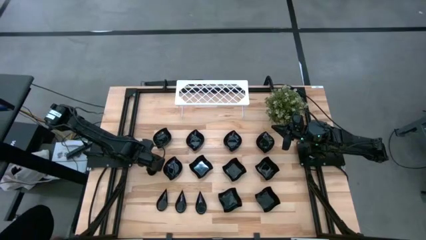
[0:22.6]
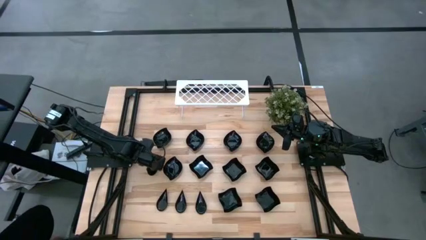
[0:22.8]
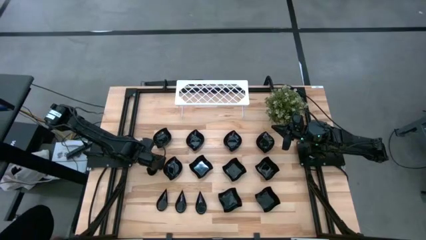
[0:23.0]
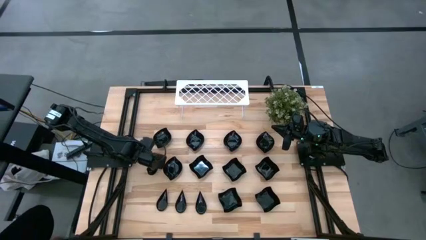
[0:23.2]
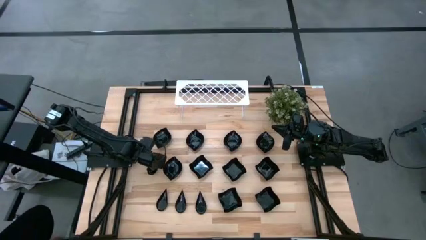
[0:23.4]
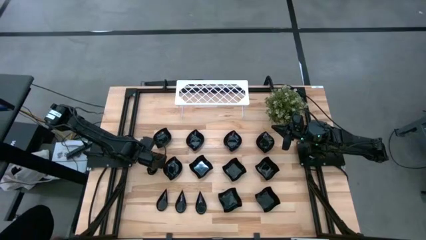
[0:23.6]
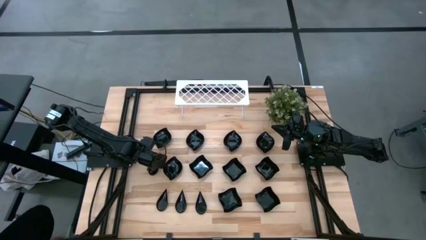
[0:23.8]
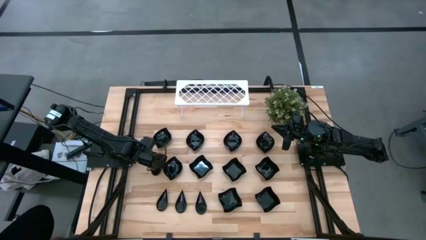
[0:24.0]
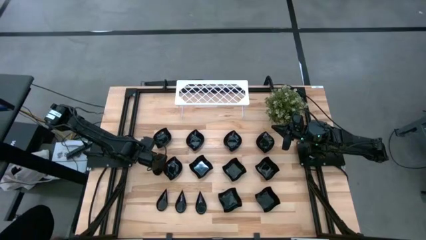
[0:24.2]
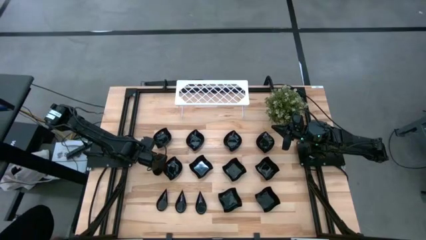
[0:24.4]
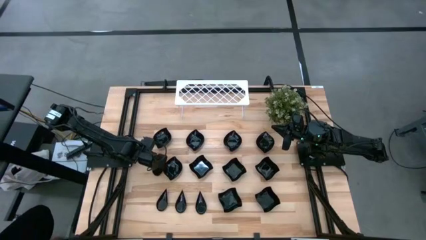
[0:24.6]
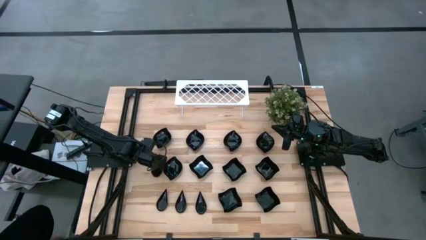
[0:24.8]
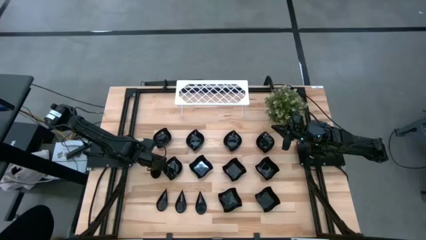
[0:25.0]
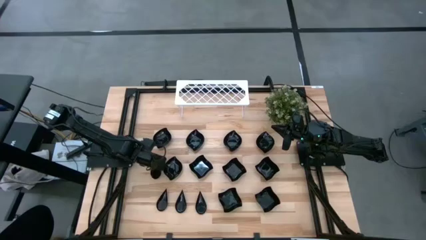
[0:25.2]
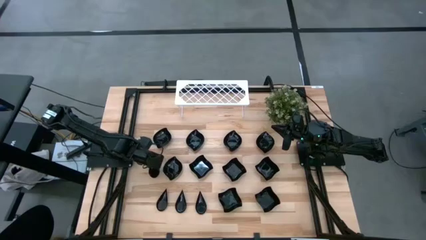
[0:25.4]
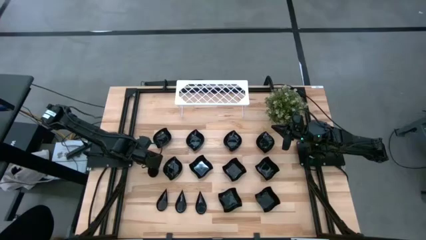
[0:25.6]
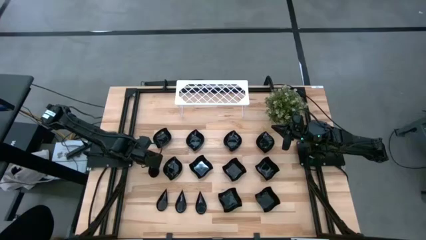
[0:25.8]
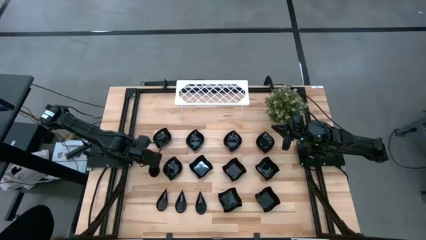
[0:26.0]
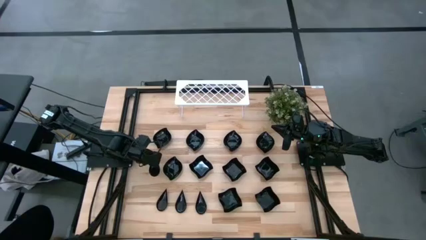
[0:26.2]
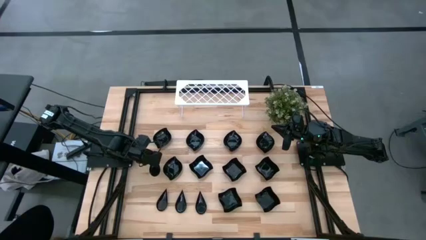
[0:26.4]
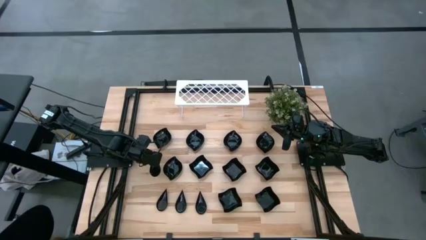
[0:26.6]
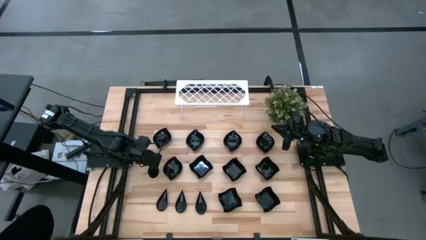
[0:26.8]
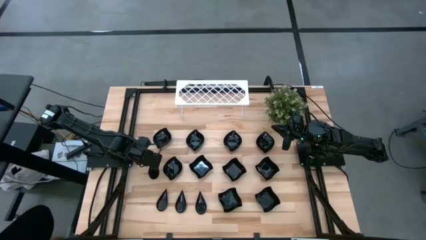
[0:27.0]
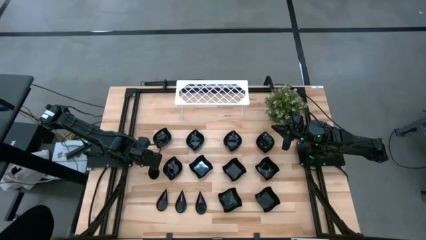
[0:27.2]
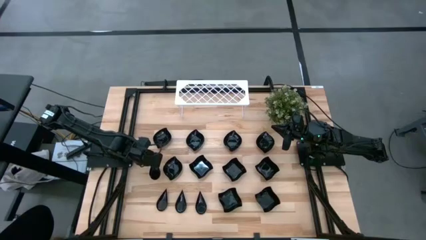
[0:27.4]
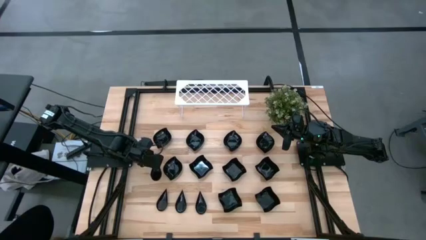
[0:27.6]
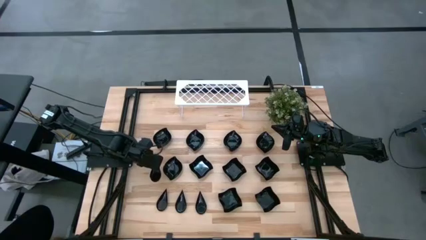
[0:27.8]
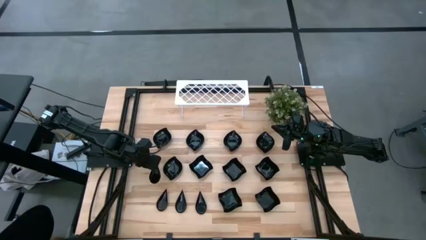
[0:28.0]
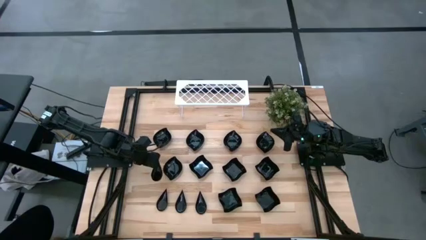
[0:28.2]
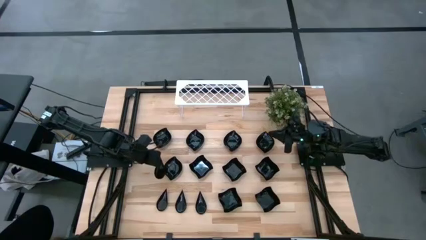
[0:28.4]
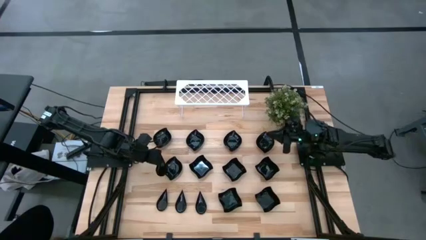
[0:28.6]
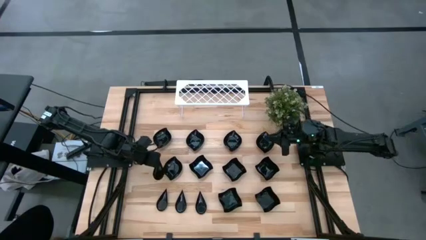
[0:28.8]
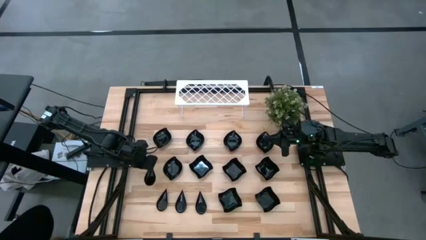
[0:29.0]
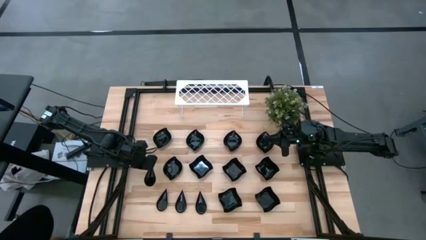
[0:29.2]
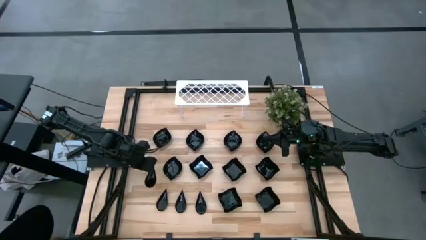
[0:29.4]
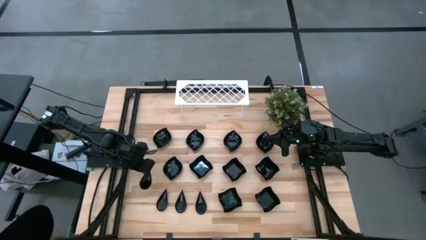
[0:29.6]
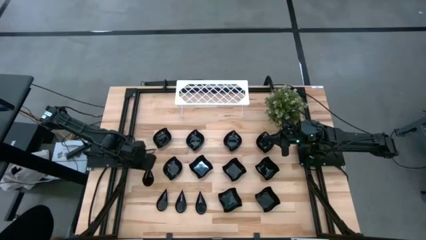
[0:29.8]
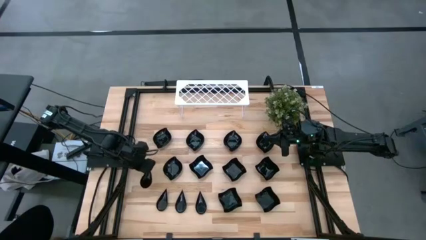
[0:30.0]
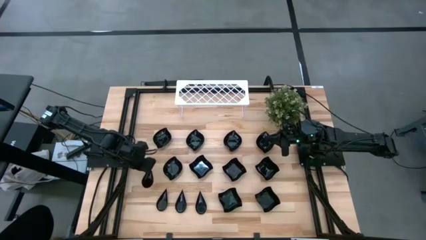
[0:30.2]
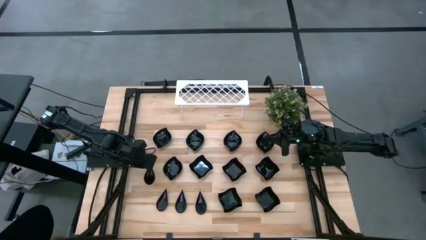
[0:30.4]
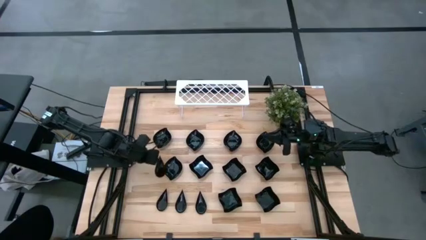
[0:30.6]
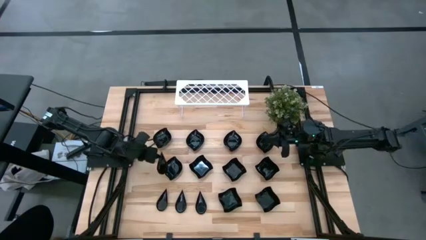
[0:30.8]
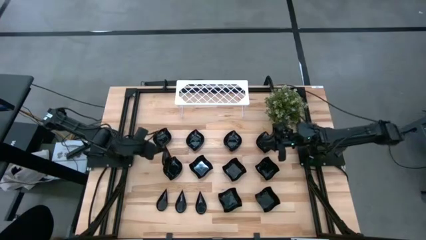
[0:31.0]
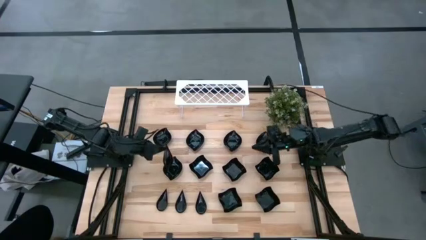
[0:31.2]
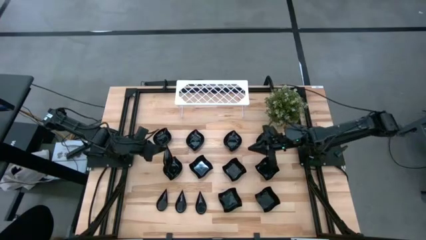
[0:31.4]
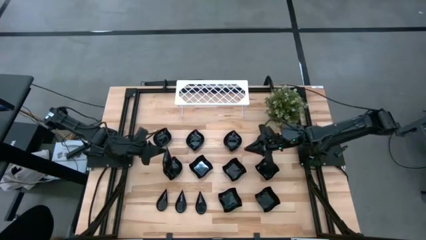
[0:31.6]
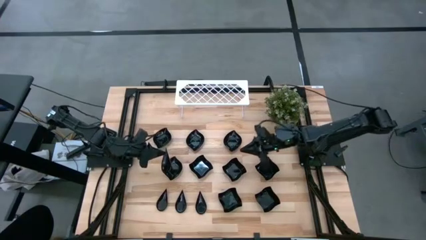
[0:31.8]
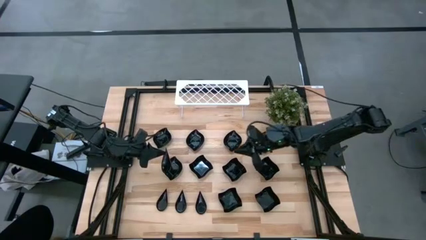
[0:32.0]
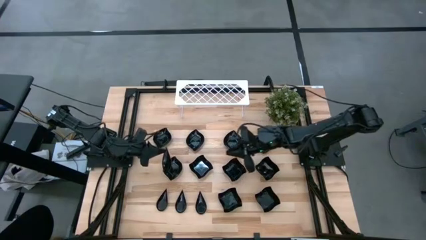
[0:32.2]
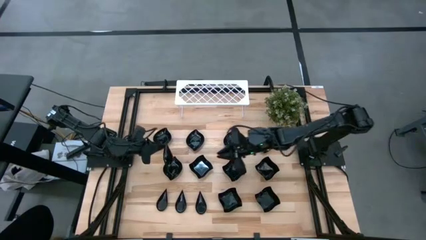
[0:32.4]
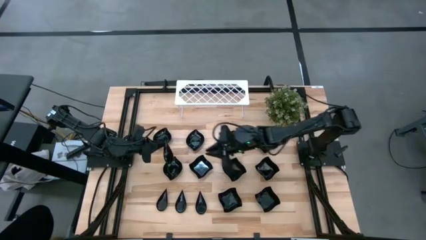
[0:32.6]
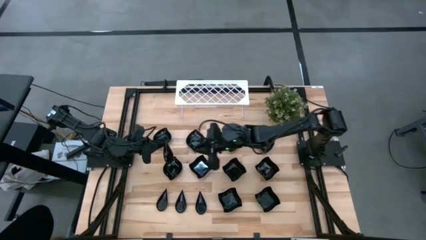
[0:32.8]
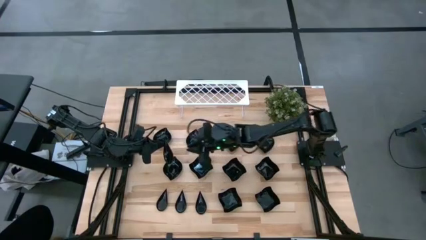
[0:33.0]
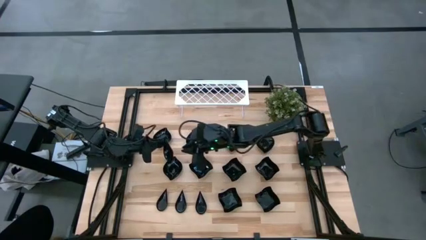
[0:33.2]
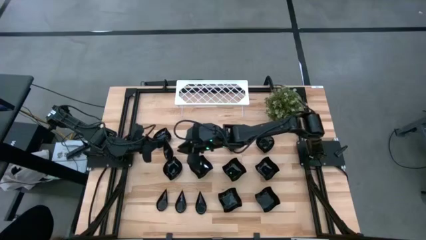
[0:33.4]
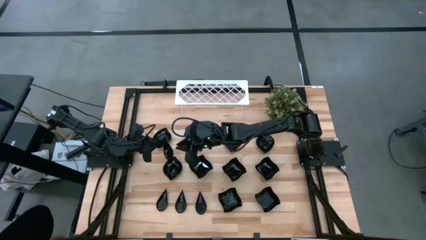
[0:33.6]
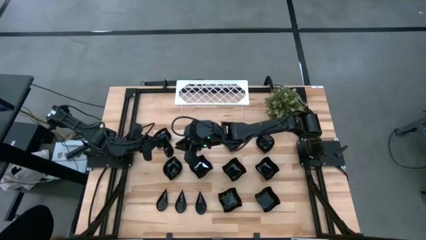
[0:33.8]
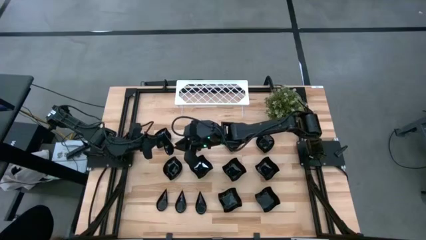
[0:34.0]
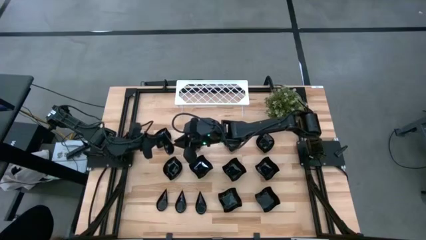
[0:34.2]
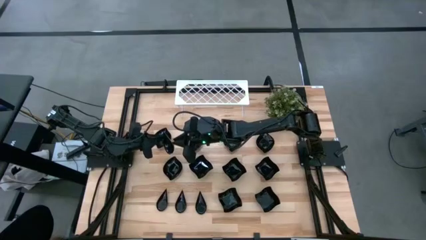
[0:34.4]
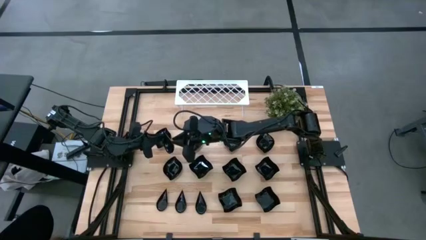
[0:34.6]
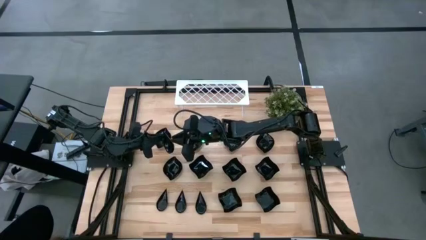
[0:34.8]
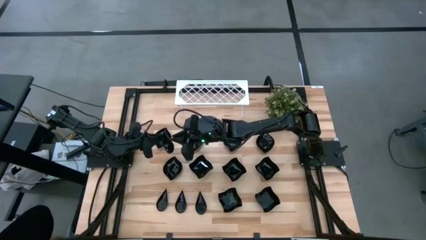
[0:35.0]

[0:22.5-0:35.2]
Task: Pick & Place Mini shaped plates
Put the black drop shaped plate on the shelf
